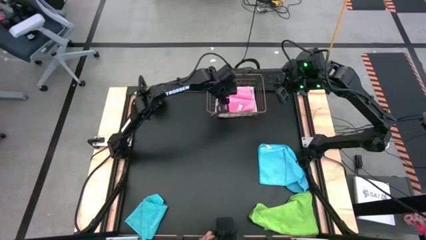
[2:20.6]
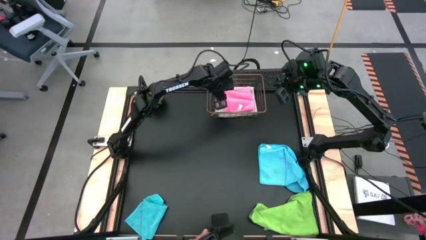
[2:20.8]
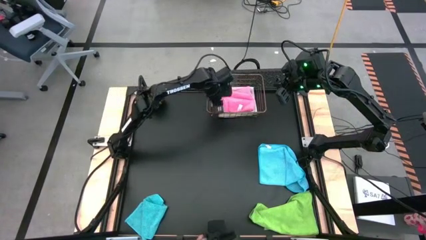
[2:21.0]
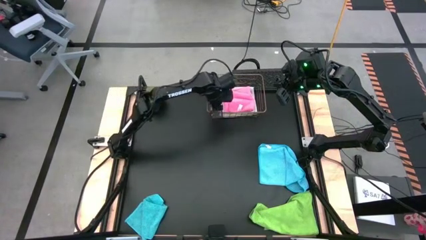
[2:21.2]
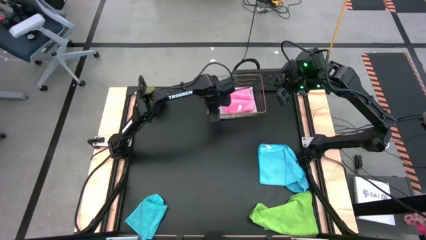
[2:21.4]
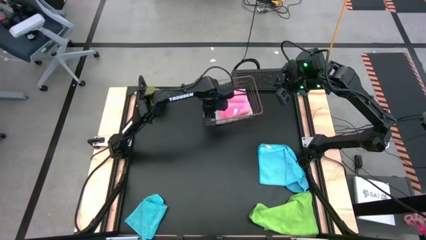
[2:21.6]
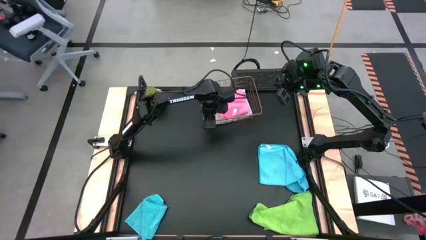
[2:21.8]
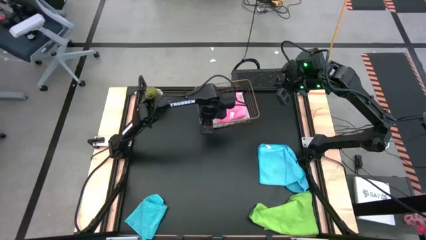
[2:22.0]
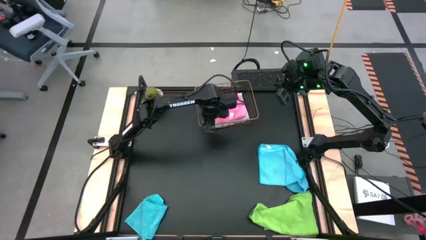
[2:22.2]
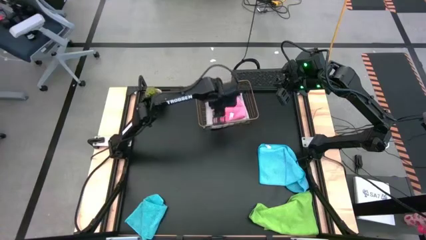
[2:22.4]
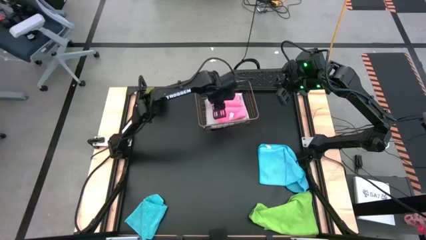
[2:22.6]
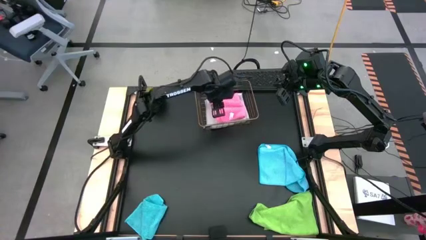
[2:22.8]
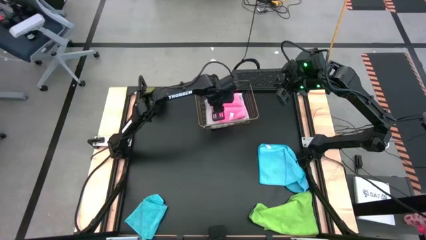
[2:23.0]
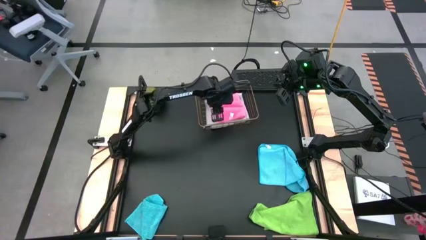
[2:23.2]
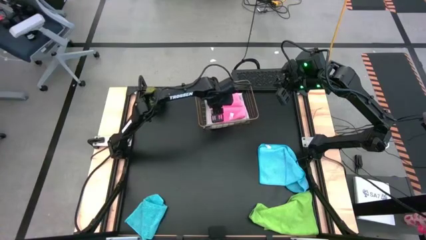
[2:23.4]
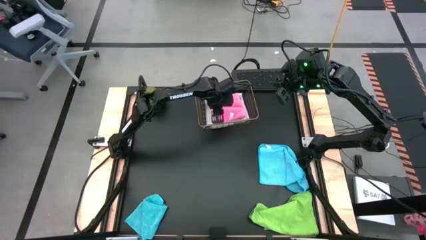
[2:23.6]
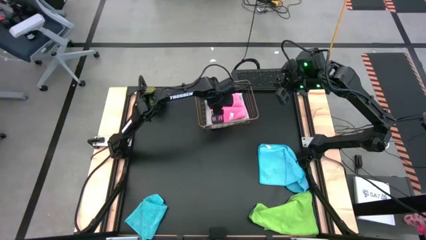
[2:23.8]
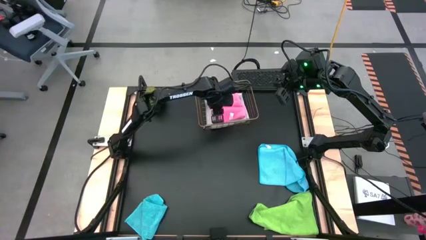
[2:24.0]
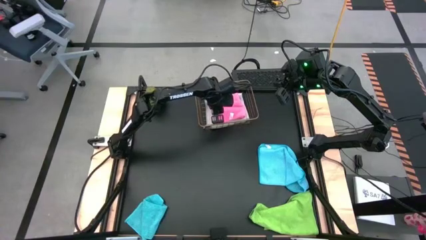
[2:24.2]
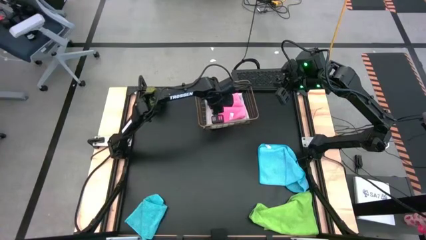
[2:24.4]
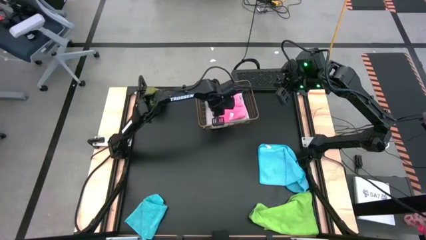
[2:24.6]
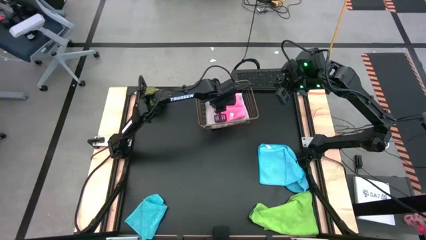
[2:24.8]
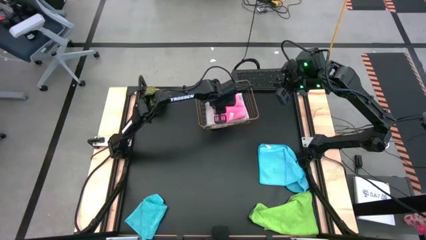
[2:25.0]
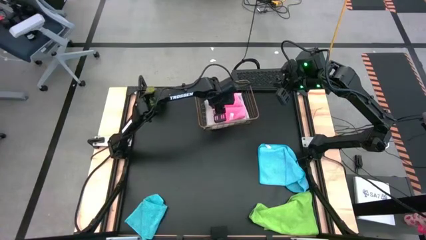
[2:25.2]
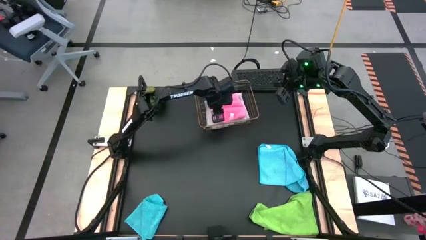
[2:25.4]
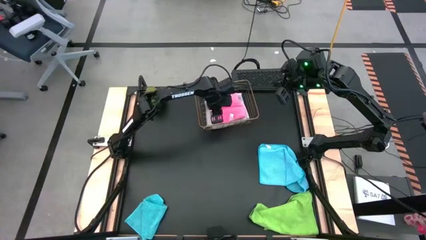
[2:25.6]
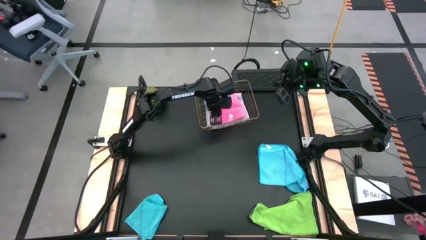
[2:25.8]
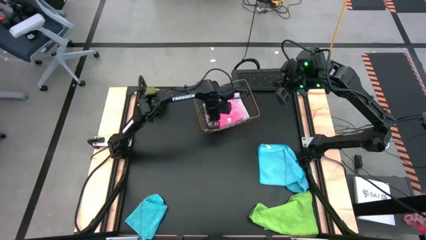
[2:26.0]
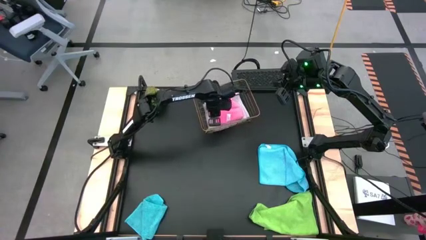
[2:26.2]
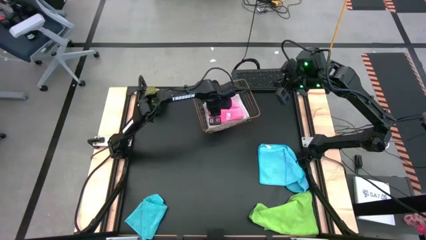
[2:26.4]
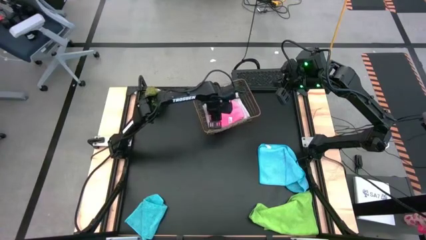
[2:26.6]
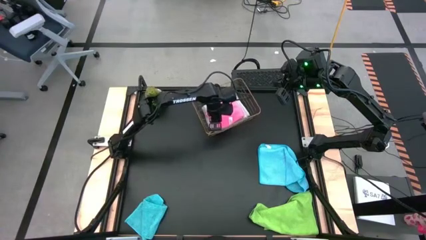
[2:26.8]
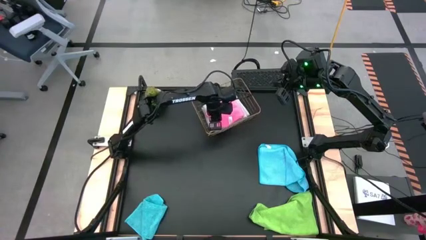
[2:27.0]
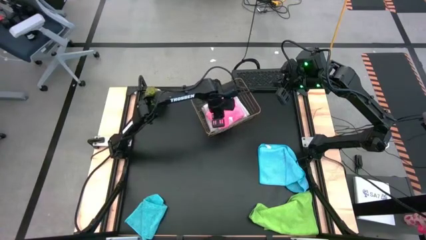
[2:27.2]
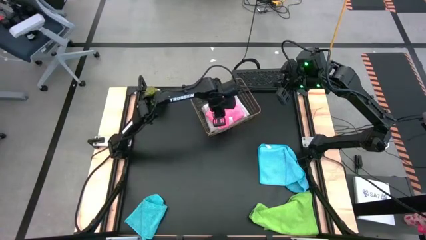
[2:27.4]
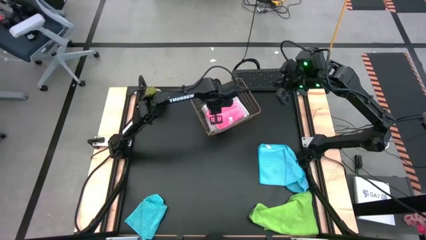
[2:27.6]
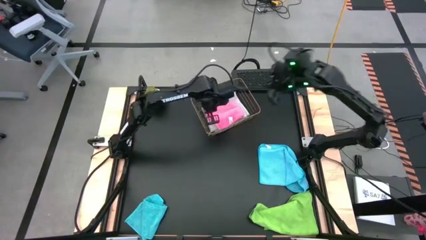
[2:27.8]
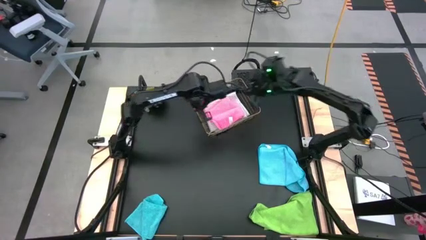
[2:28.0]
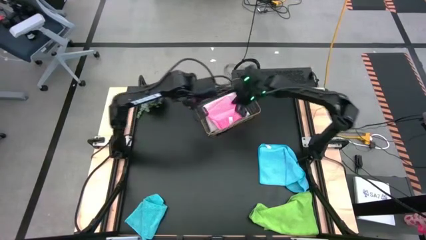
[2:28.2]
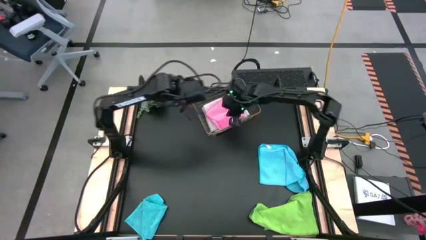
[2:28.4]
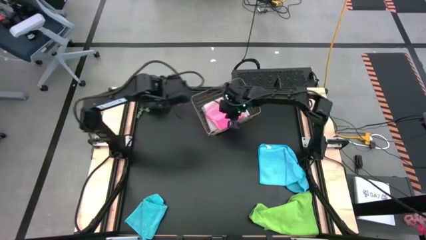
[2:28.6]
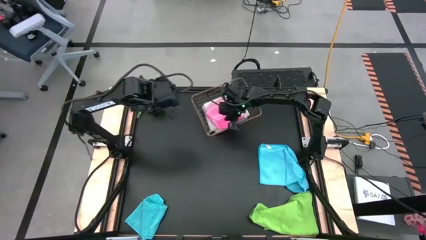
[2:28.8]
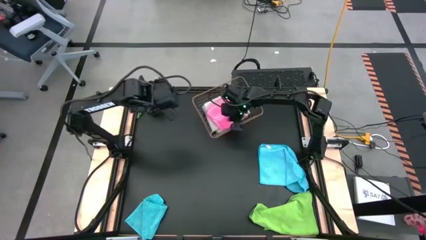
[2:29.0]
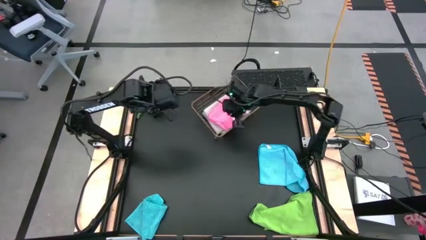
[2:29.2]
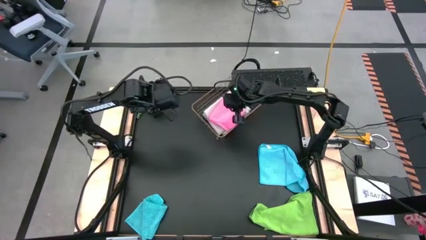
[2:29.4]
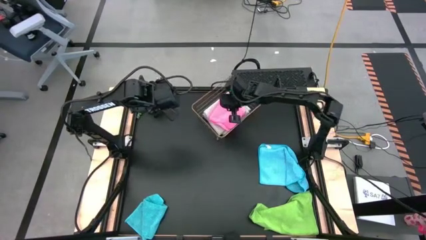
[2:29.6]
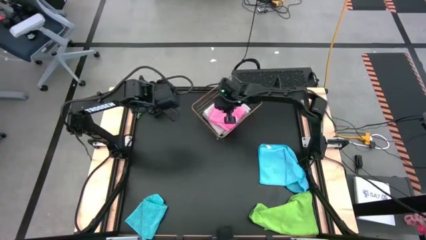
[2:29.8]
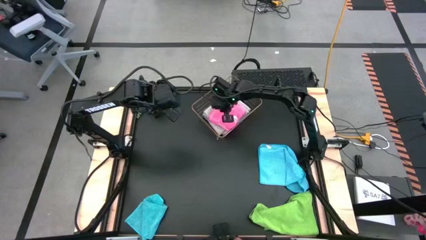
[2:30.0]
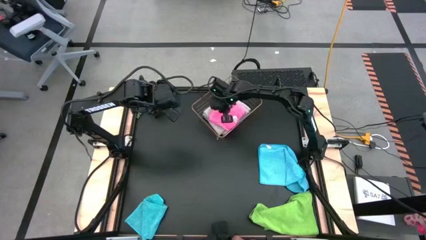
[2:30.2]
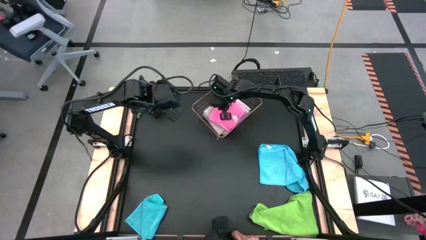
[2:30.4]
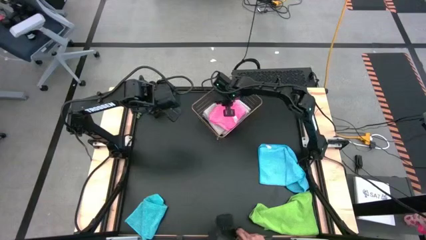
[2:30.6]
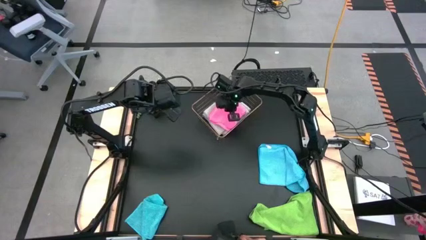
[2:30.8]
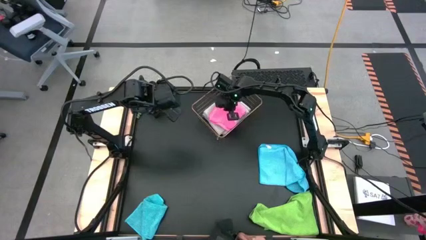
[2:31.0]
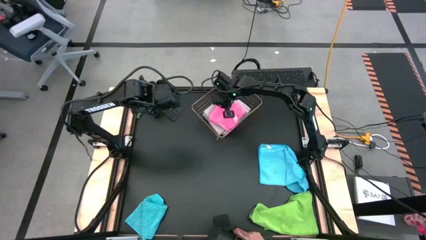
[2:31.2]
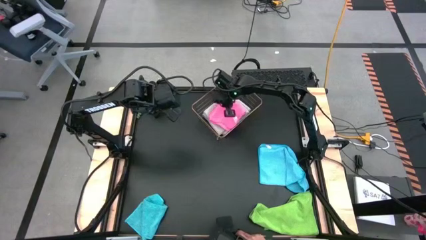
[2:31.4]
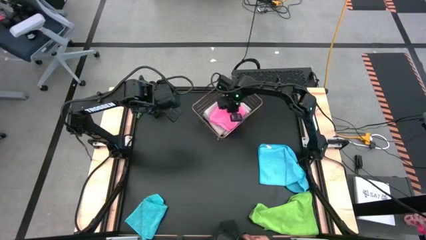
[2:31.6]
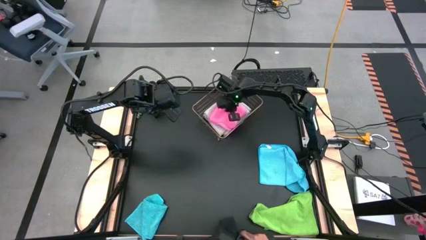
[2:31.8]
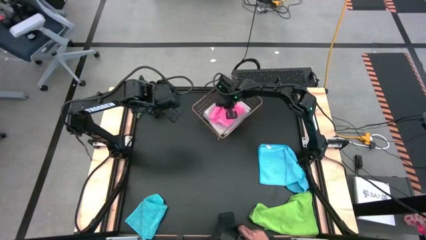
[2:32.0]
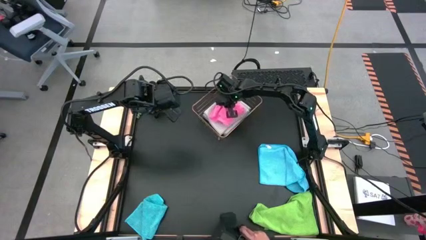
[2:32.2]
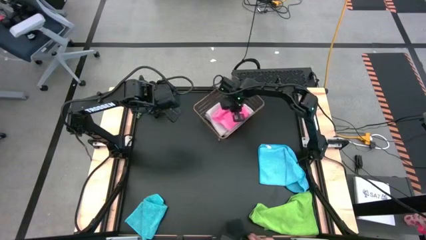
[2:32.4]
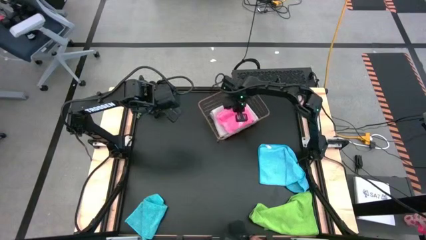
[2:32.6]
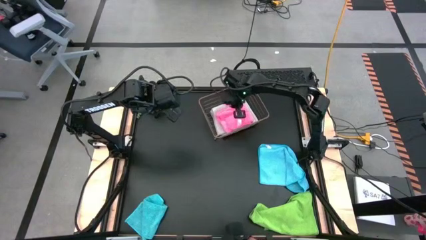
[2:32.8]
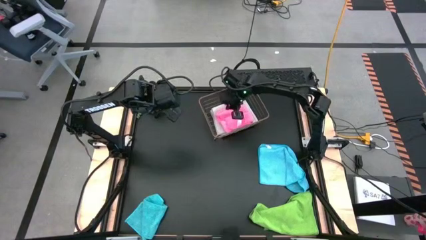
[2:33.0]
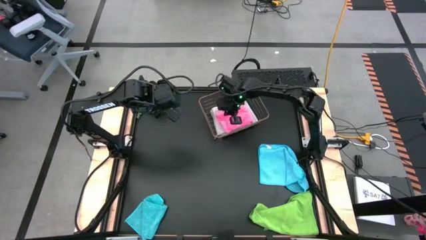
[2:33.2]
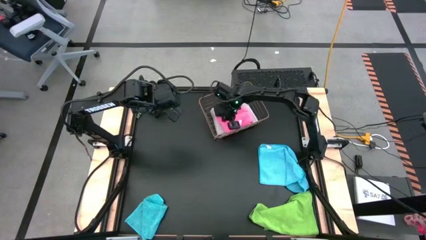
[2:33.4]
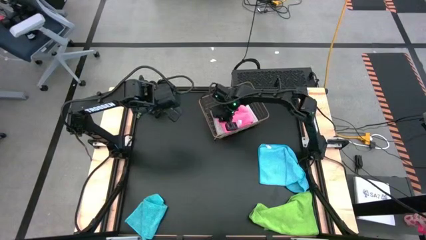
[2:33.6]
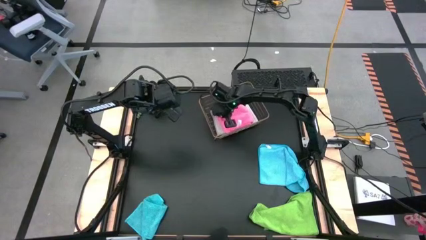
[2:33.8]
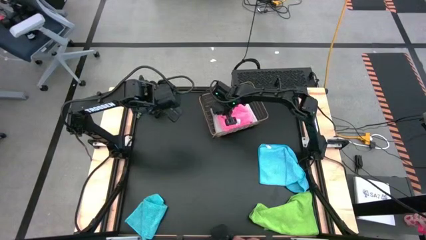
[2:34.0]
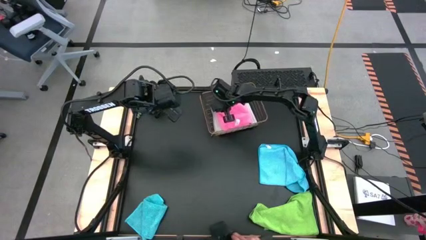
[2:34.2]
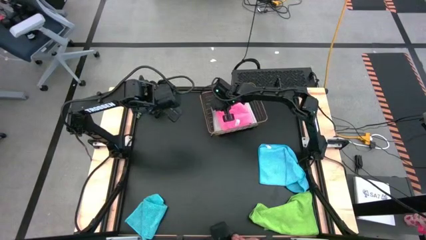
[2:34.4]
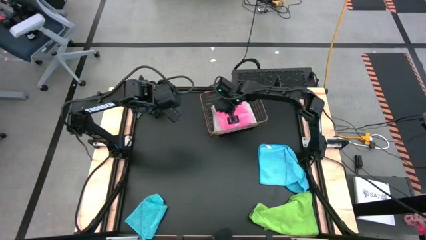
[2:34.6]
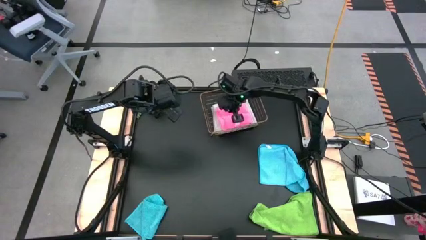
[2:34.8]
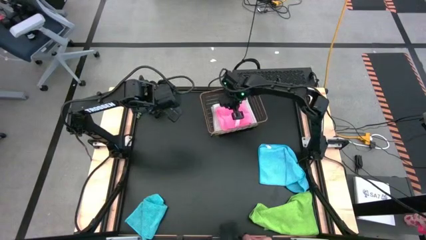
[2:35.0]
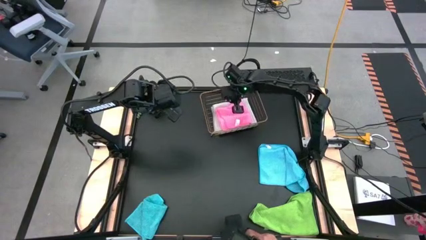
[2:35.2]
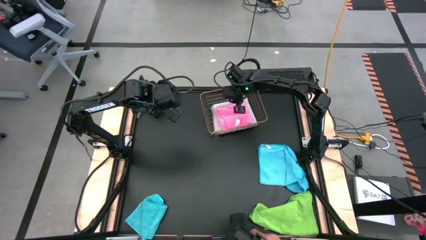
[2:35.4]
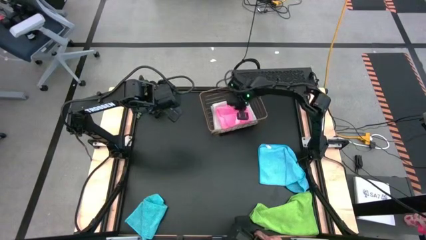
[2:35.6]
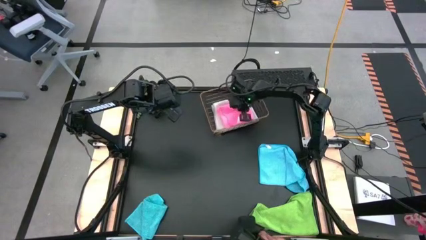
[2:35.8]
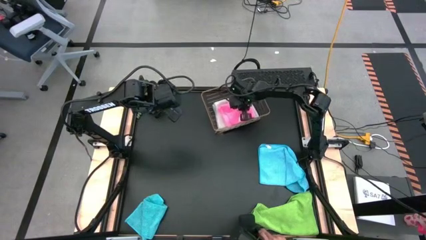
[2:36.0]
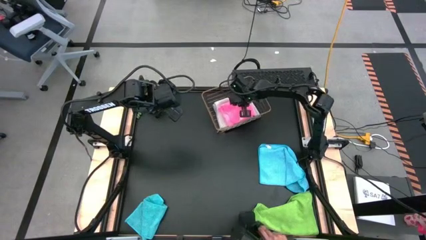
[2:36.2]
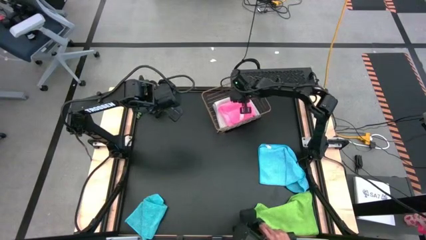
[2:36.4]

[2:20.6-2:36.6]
Task: Fold microfiber towels
Put the pink towel into the wire basket
